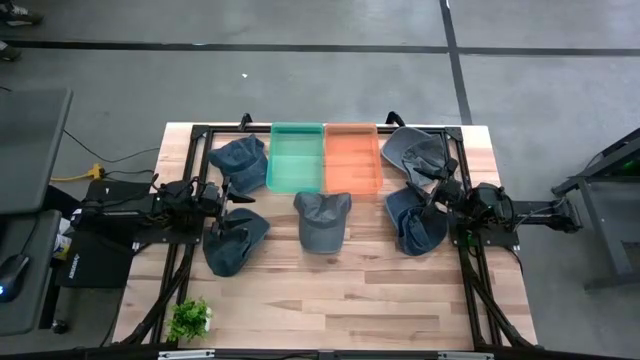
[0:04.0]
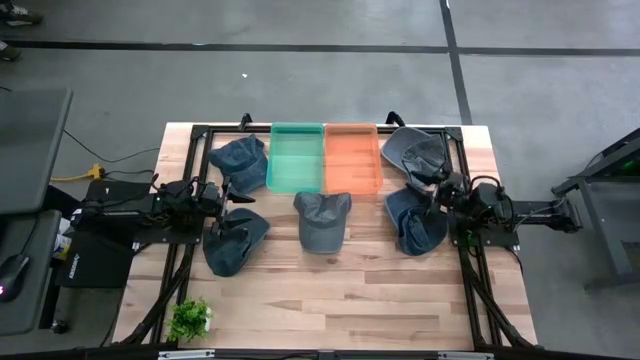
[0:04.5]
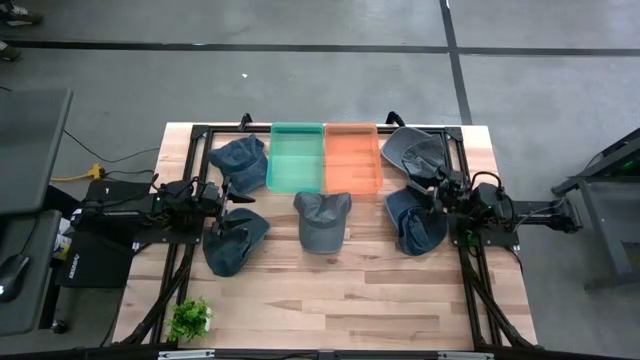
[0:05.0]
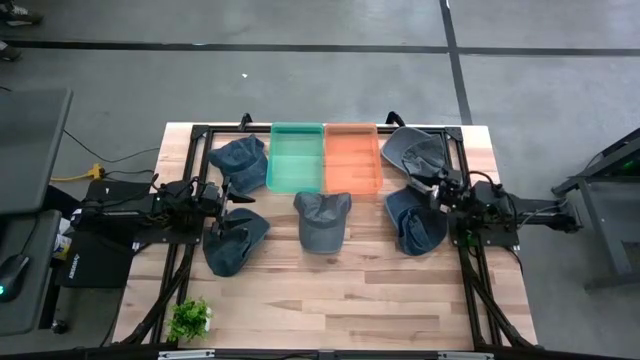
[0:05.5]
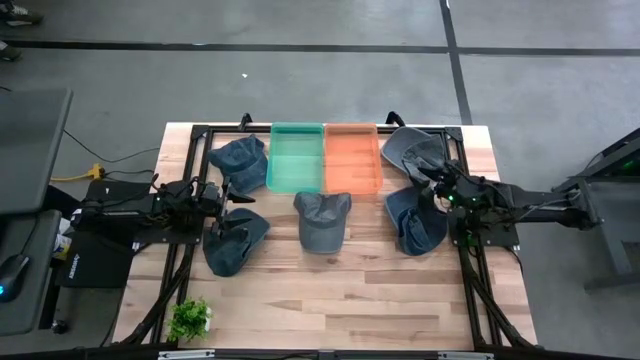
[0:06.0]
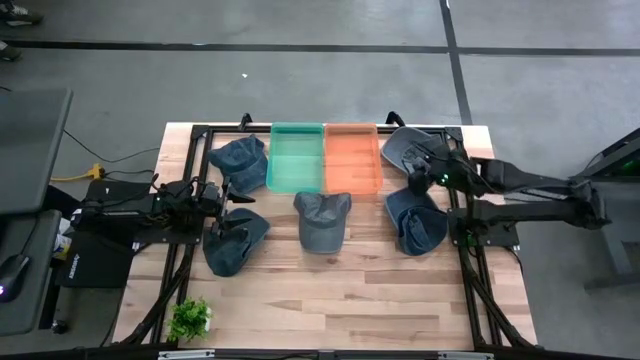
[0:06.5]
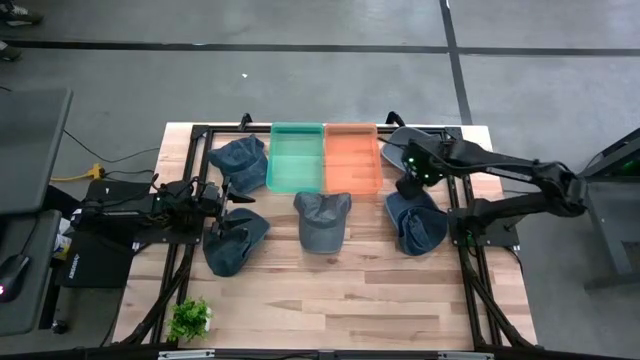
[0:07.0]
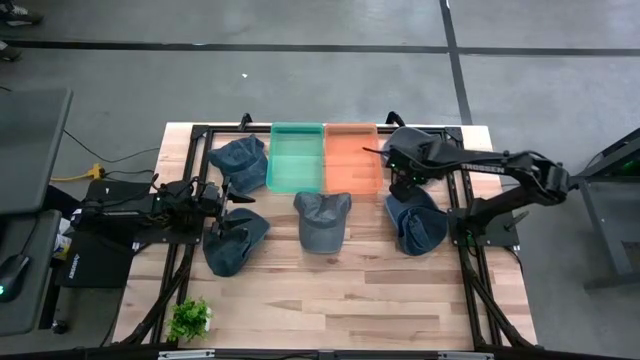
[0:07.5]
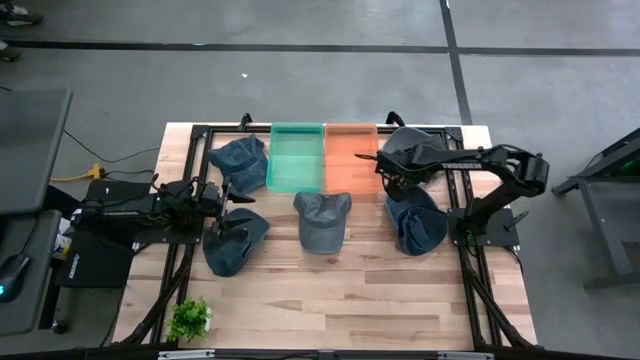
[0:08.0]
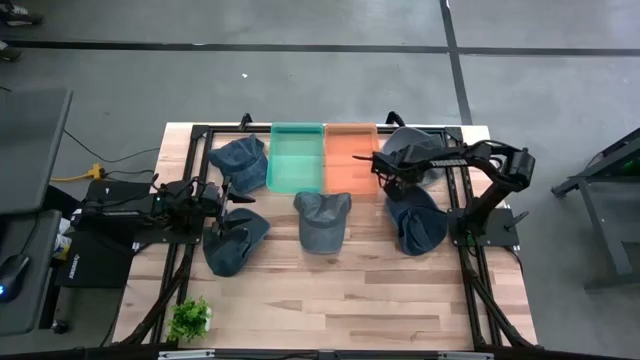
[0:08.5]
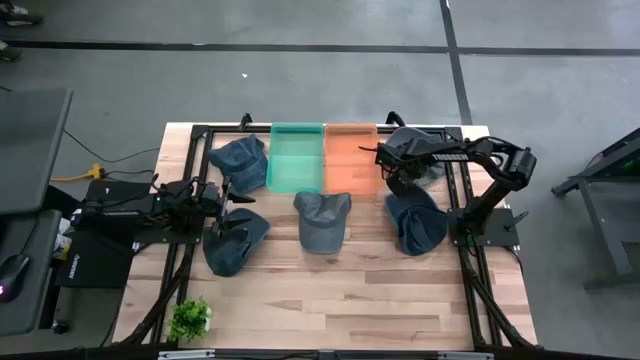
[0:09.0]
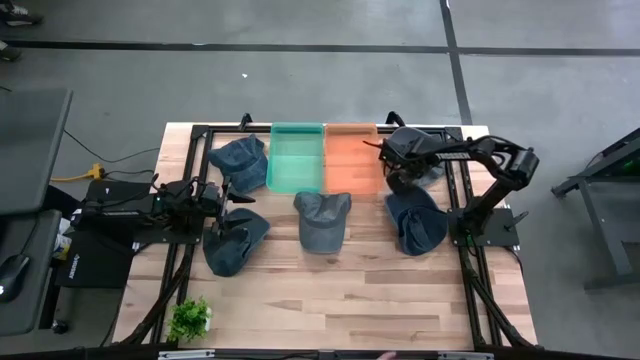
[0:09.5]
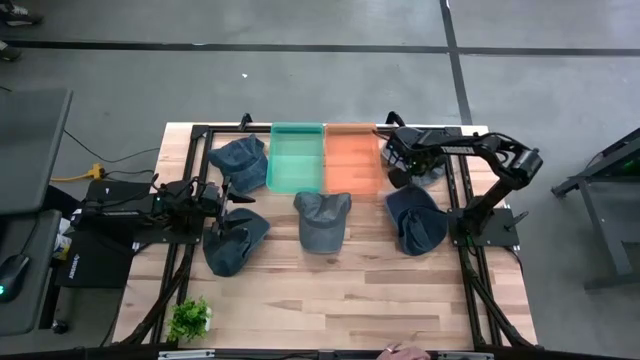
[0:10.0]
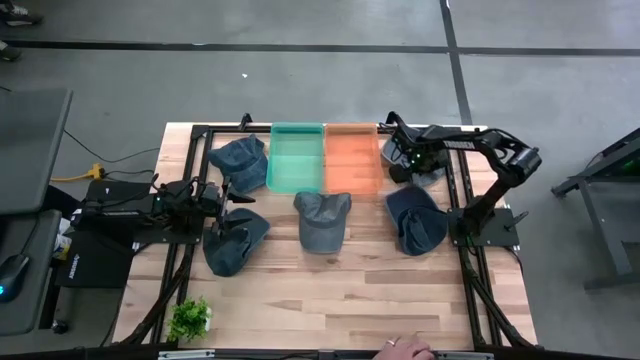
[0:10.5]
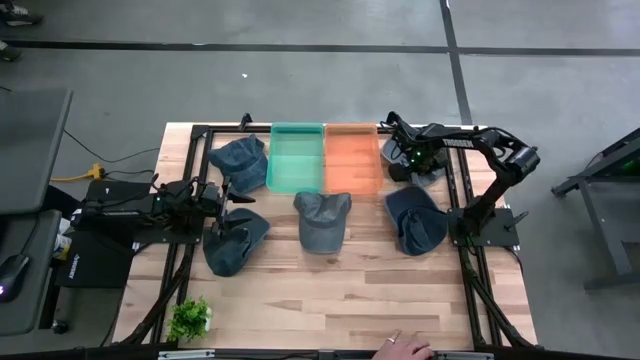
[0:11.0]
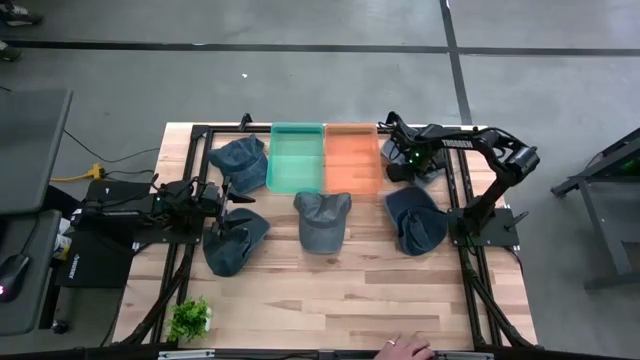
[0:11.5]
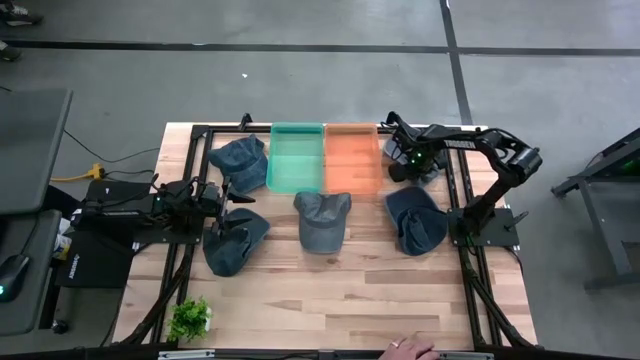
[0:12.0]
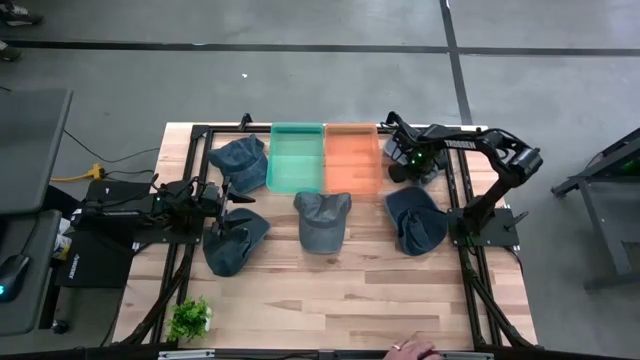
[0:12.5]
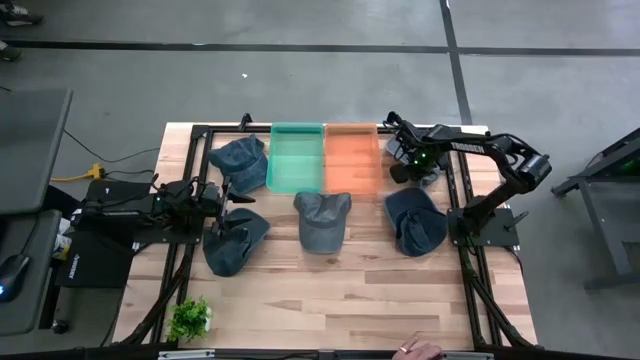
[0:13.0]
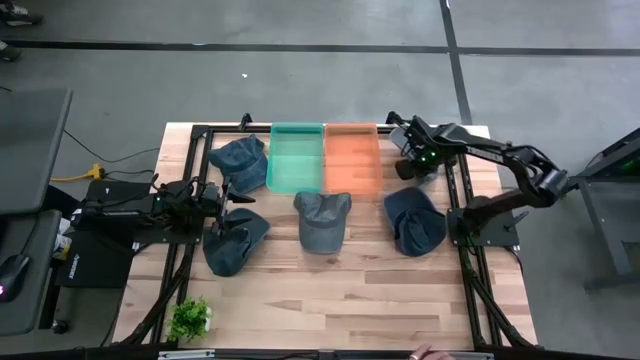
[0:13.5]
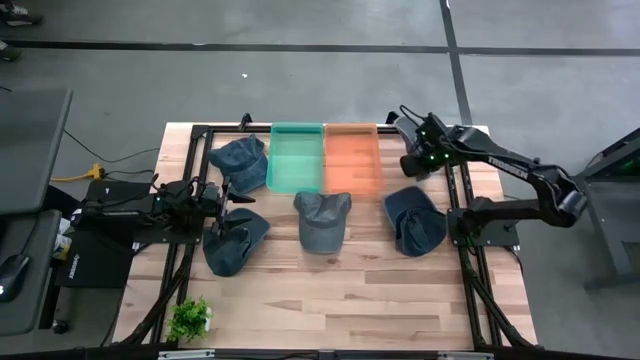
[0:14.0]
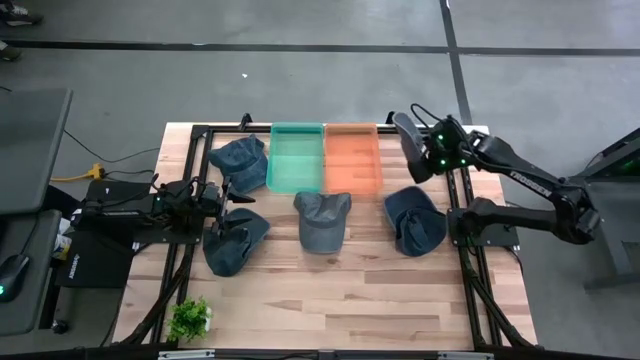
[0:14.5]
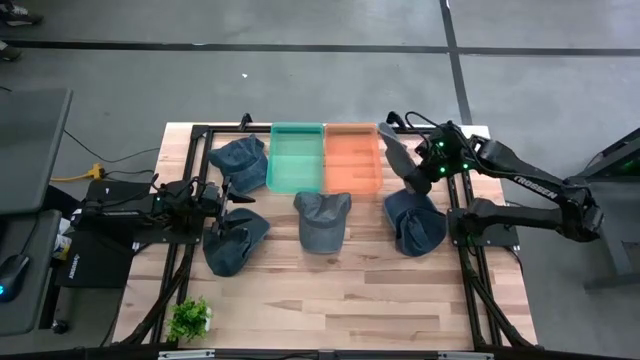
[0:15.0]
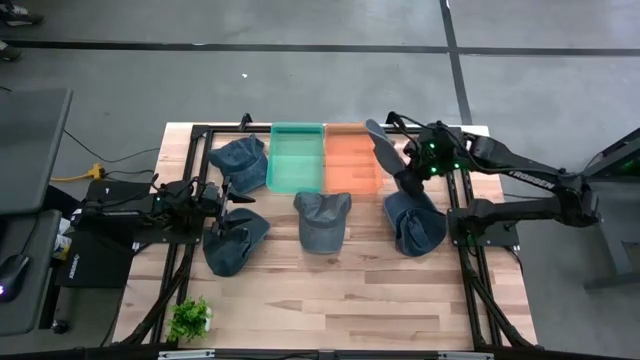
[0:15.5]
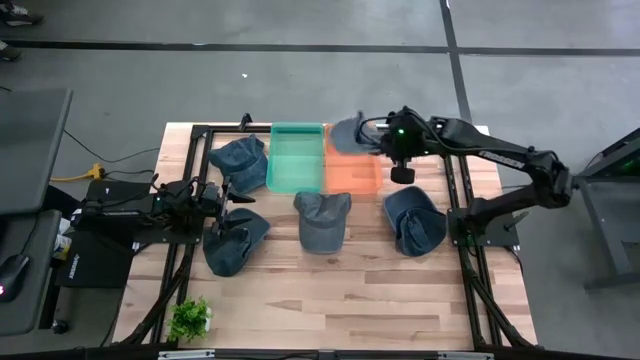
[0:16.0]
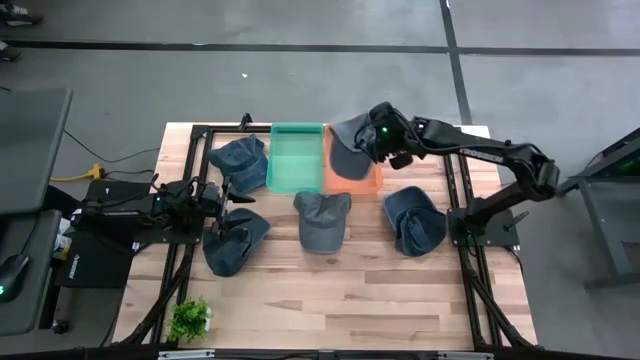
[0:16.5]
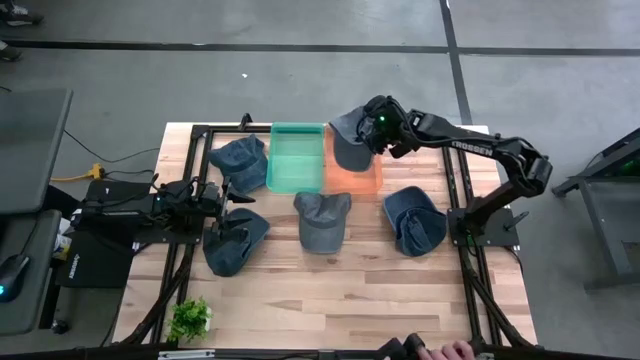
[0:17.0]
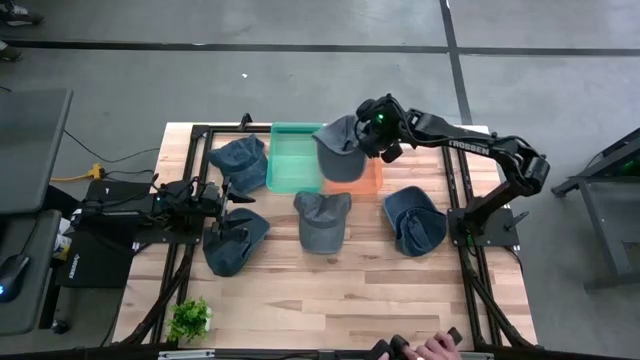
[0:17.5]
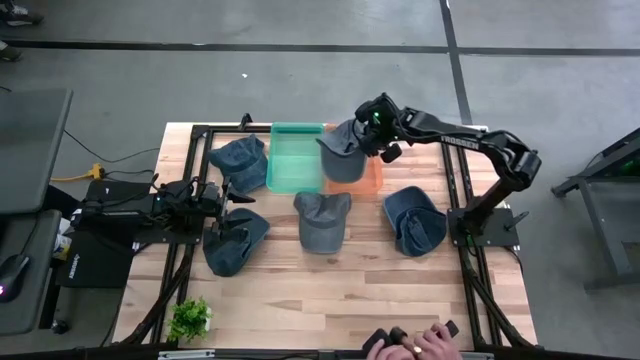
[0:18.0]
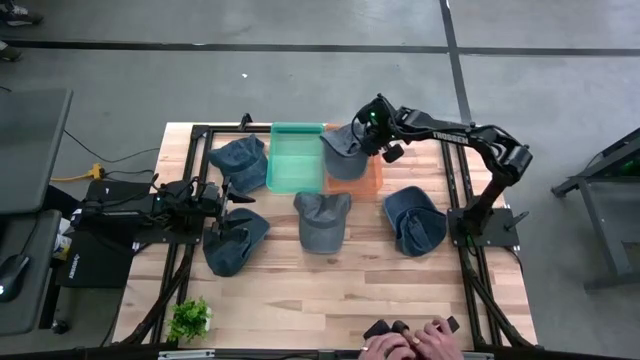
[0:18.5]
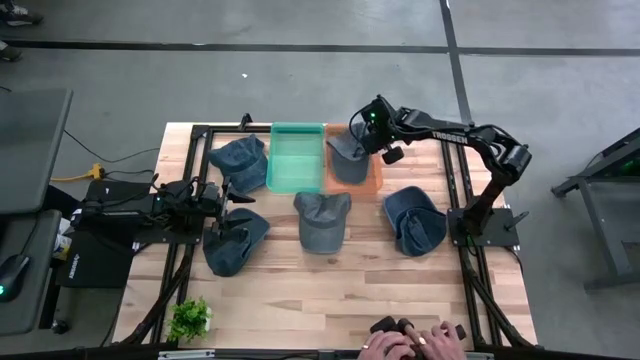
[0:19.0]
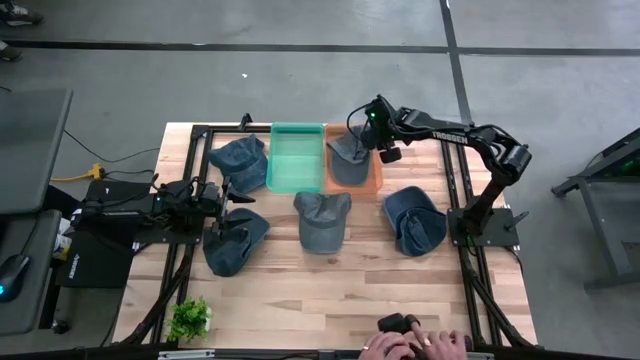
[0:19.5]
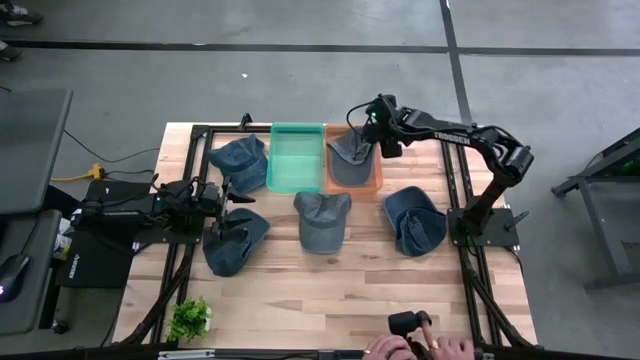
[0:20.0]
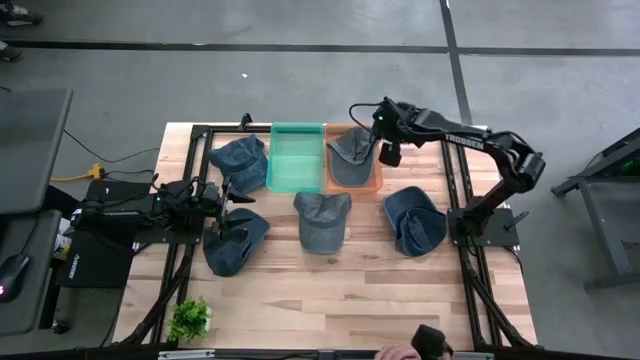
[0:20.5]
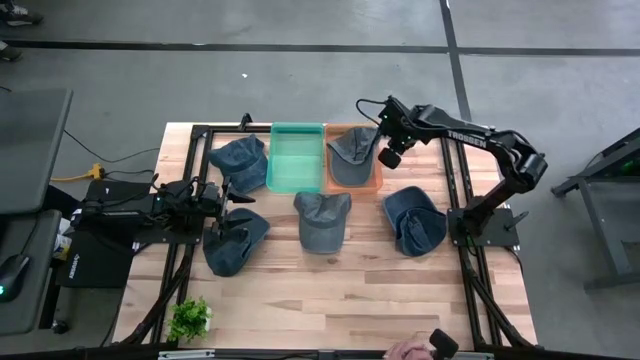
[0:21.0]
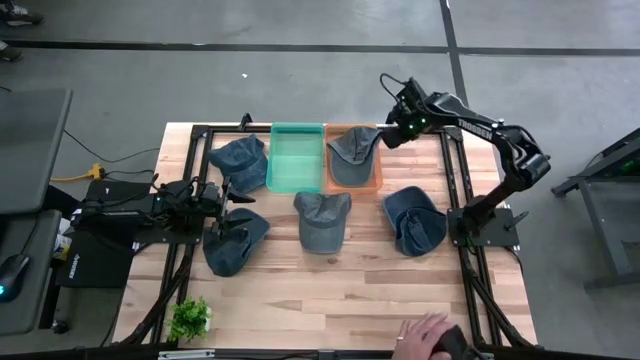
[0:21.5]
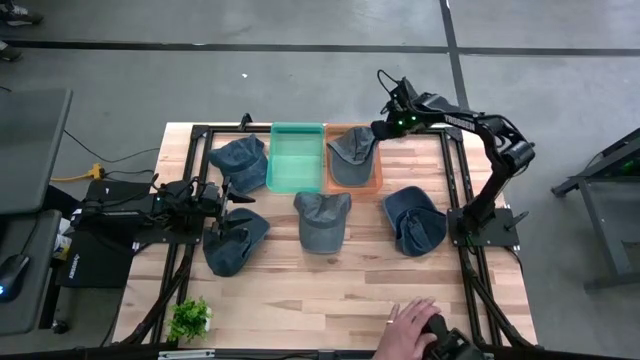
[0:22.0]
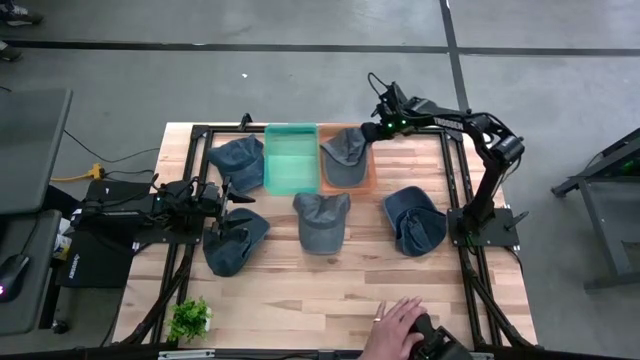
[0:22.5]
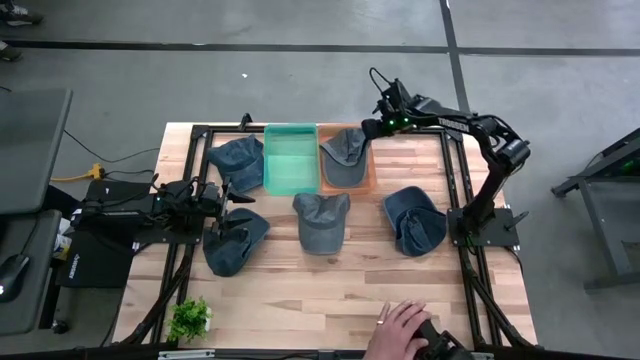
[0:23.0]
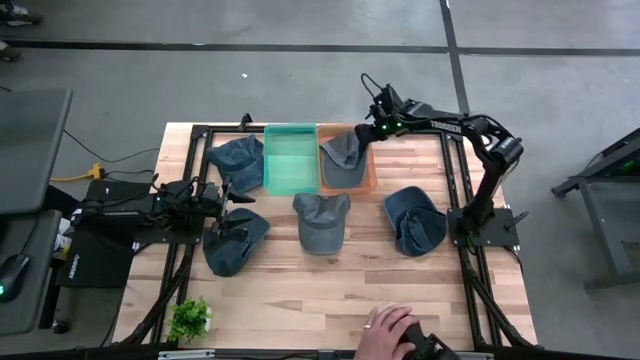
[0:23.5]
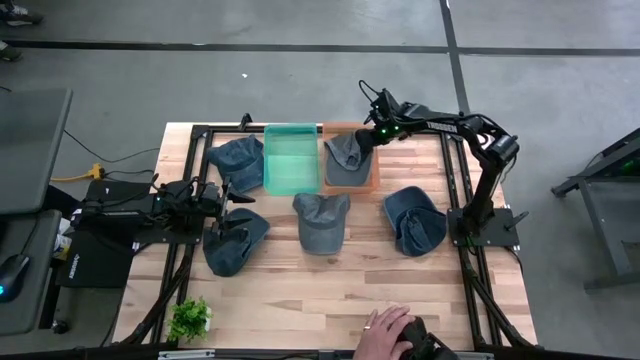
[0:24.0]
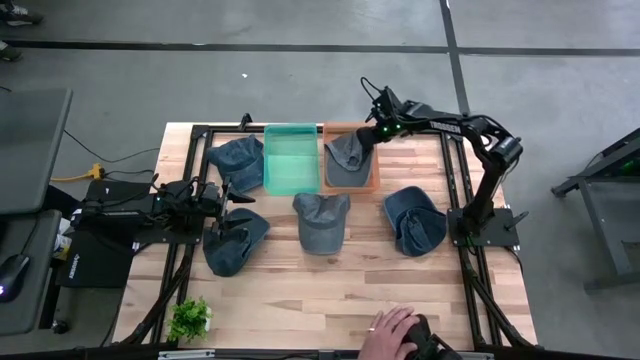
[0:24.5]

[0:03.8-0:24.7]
Task: Pick & Place hat
Put the top gray cap into the orange bin
